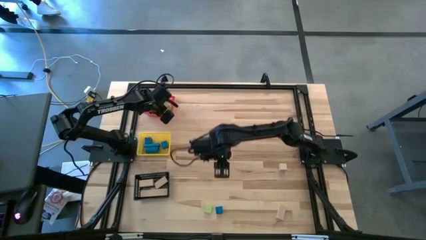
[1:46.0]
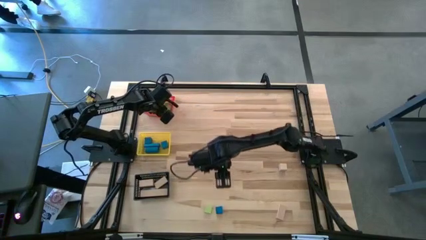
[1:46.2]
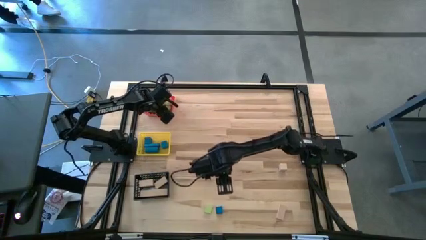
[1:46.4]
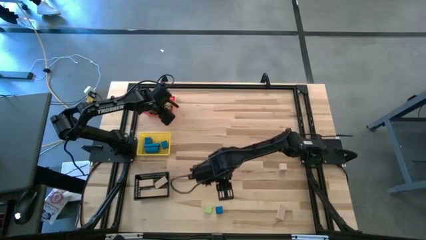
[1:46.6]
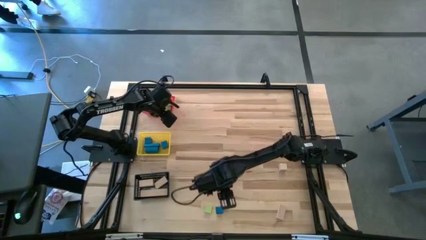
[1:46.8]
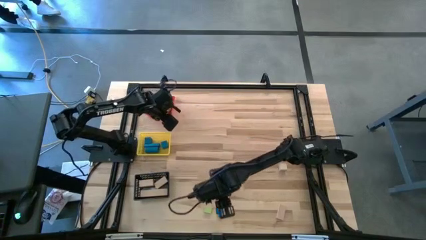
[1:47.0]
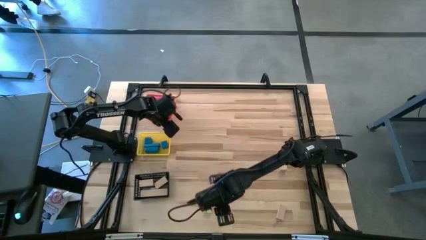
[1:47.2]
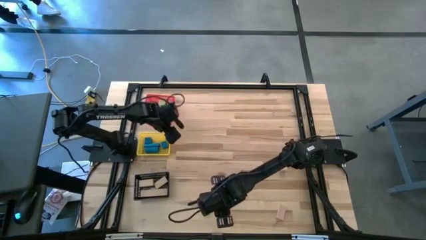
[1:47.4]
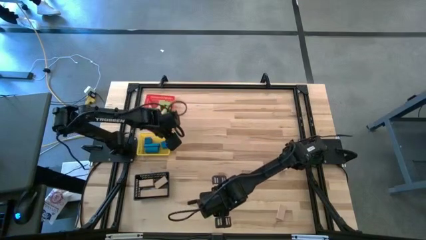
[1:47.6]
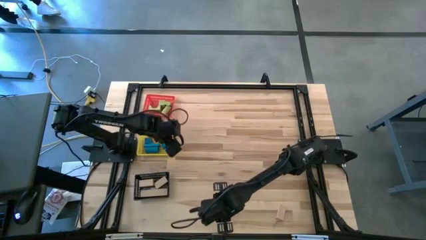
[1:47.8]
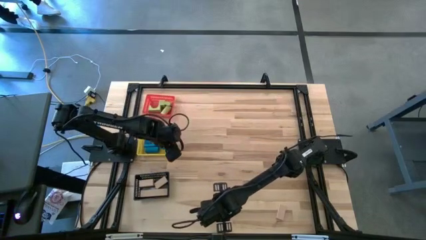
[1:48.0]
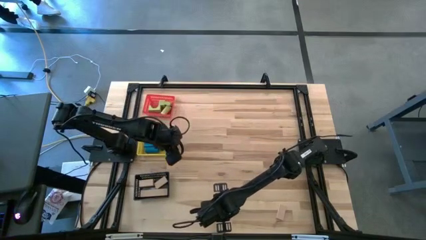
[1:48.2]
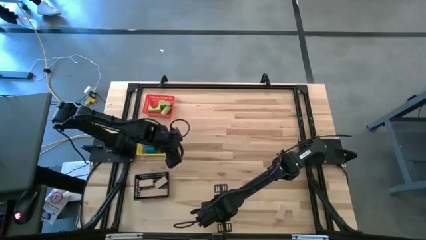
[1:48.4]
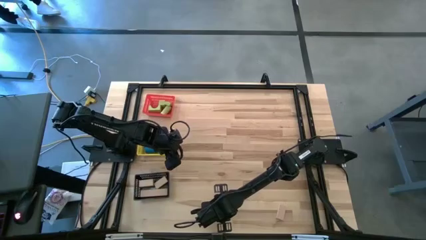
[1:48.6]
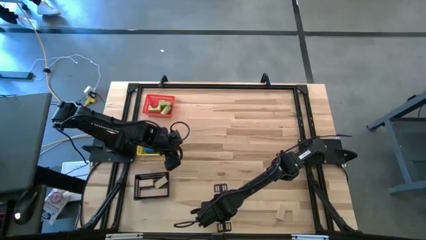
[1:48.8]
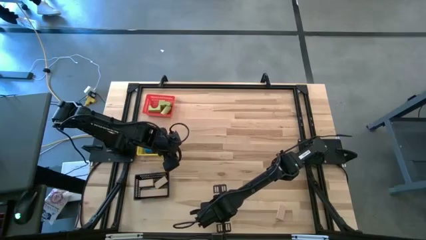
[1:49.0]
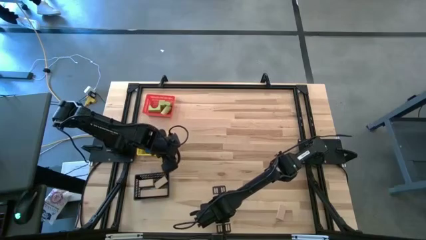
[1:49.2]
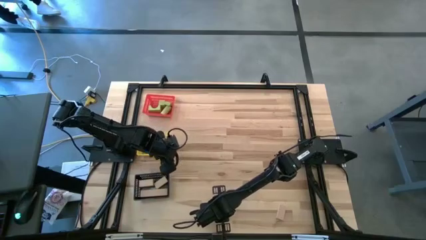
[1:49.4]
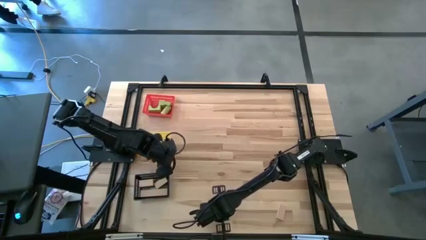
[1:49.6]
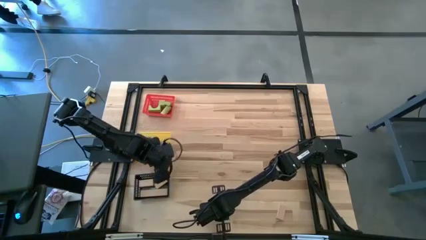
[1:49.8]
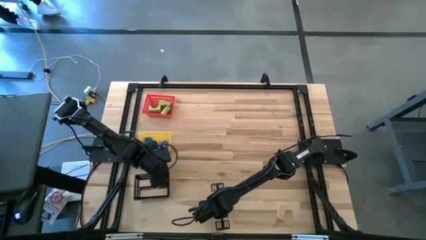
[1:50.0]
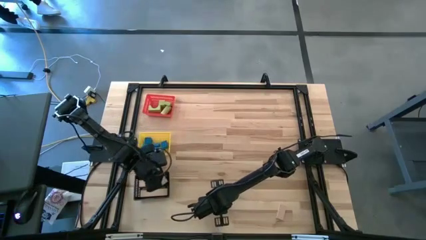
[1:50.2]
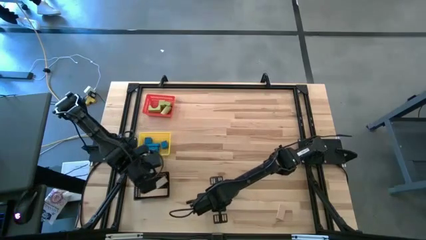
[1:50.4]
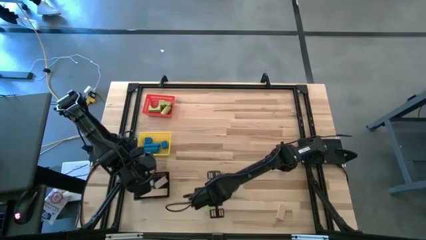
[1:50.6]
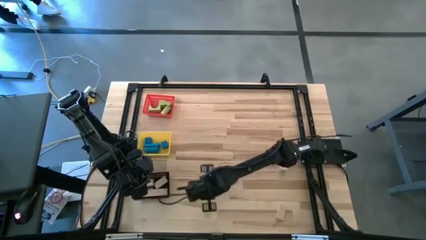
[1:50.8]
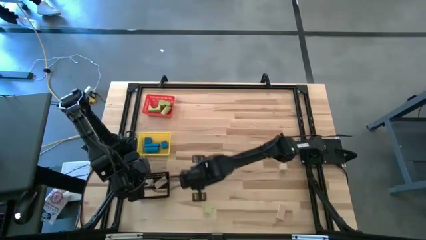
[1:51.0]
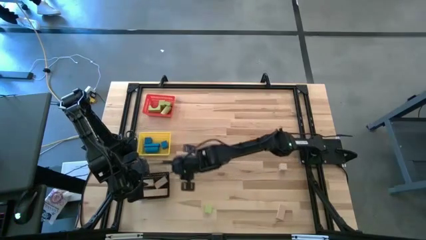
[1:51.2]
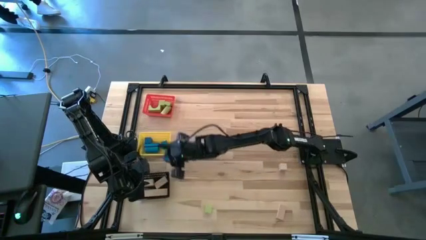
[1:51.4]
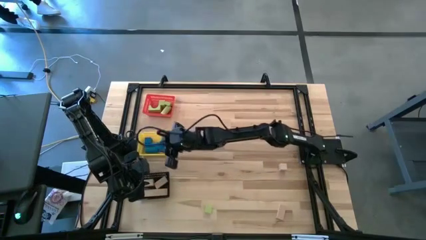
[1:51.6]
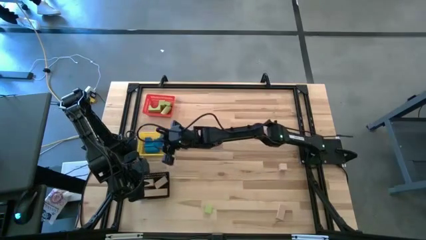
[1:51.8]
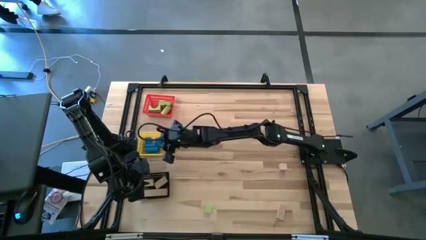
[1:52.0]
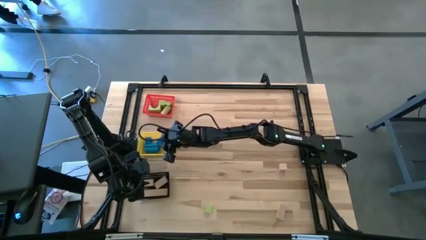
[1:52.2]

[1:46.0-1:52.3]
Task: Sort & place blocks by color
Put the triangular blue block into the yellow basket

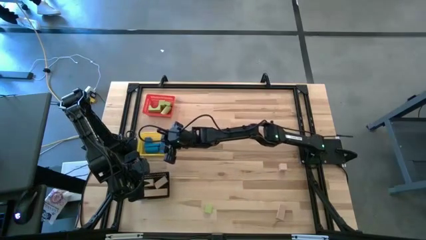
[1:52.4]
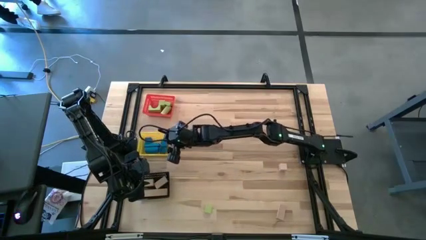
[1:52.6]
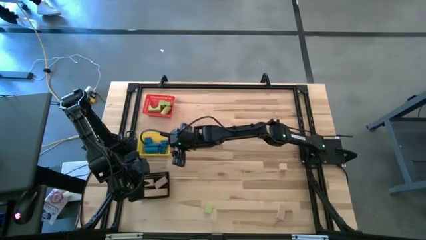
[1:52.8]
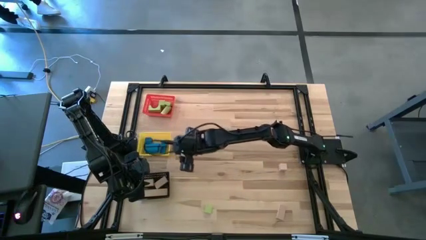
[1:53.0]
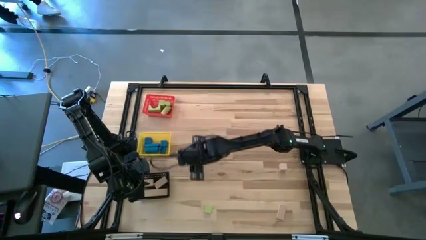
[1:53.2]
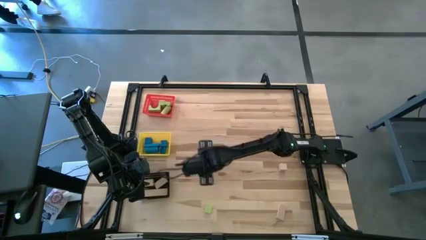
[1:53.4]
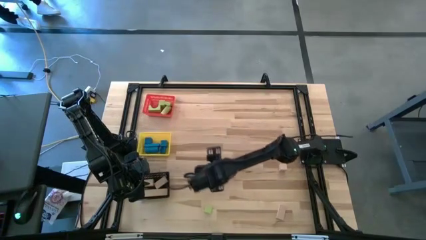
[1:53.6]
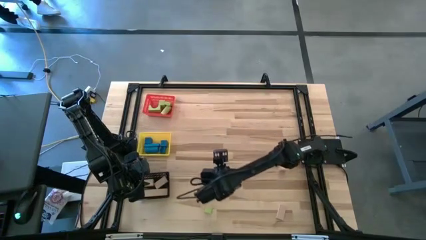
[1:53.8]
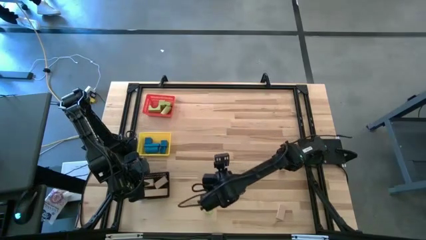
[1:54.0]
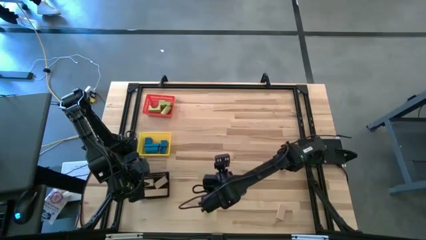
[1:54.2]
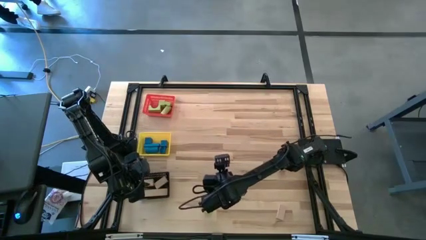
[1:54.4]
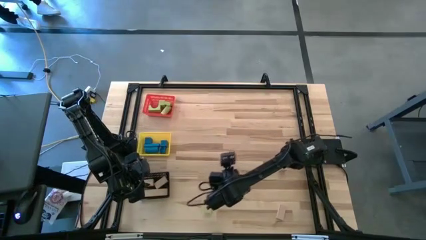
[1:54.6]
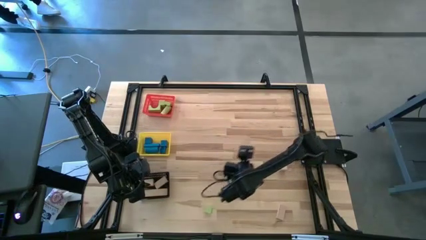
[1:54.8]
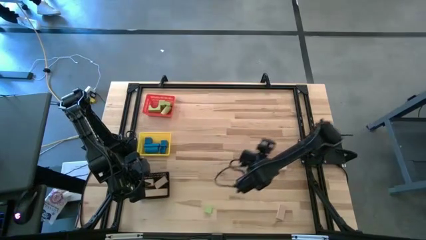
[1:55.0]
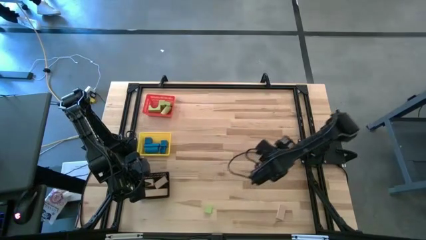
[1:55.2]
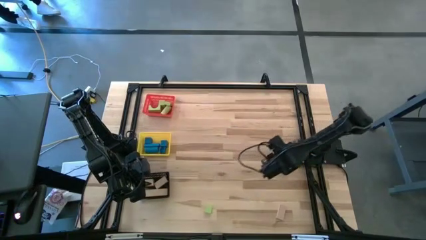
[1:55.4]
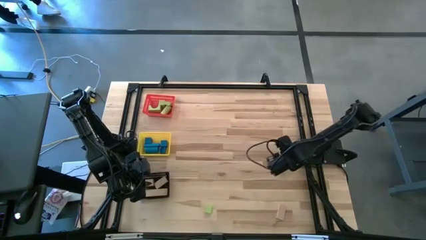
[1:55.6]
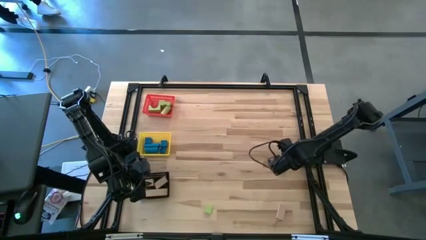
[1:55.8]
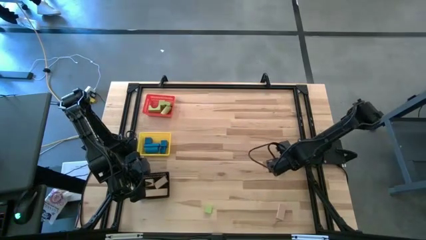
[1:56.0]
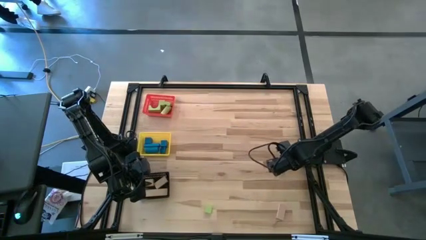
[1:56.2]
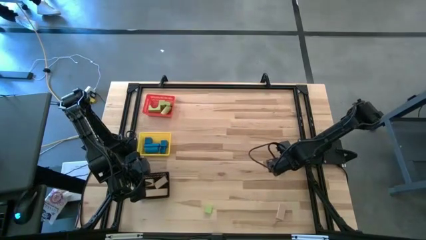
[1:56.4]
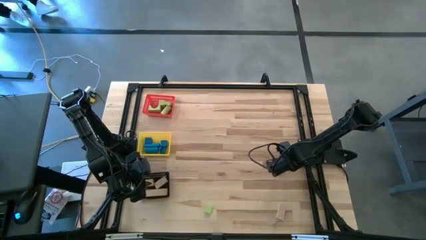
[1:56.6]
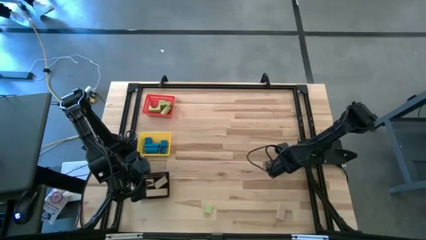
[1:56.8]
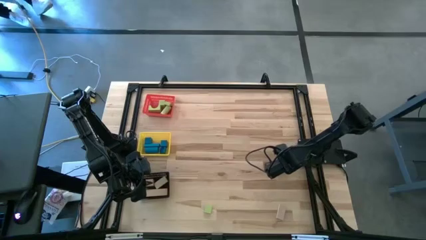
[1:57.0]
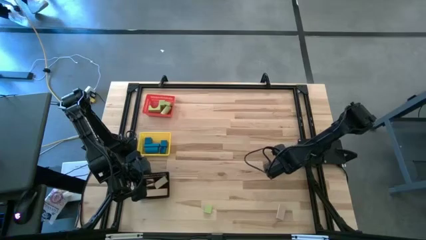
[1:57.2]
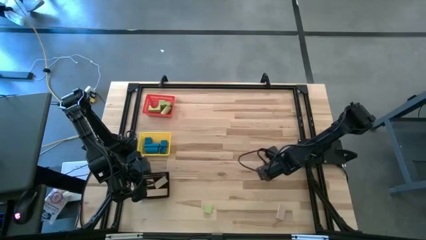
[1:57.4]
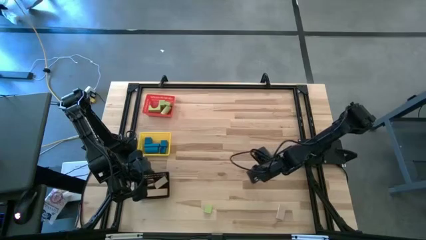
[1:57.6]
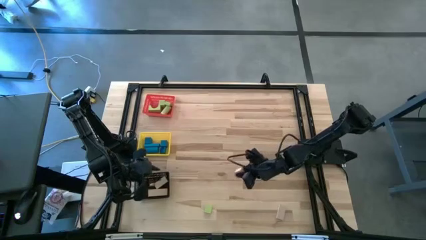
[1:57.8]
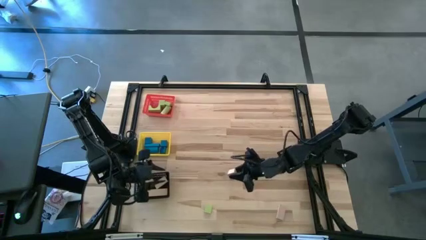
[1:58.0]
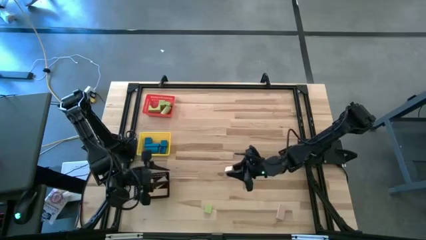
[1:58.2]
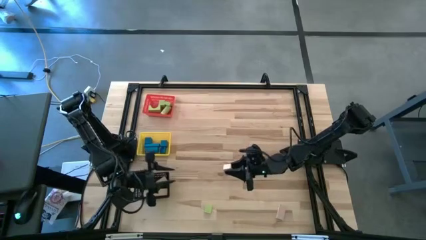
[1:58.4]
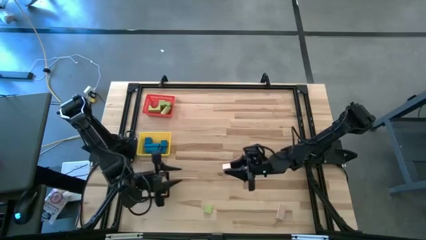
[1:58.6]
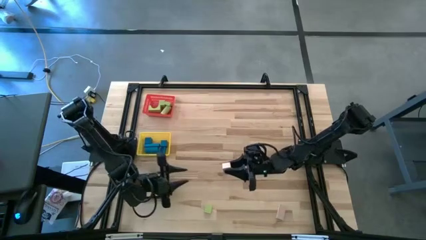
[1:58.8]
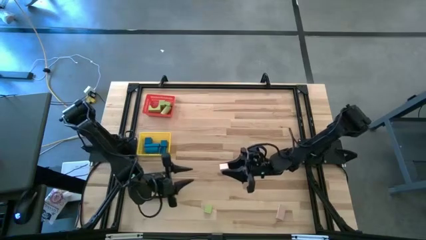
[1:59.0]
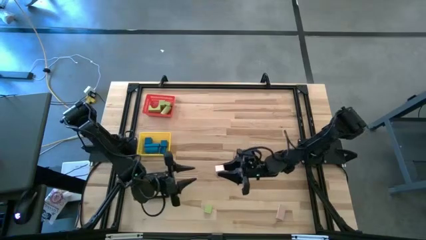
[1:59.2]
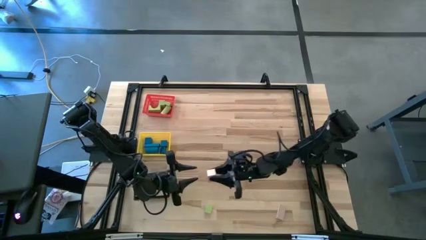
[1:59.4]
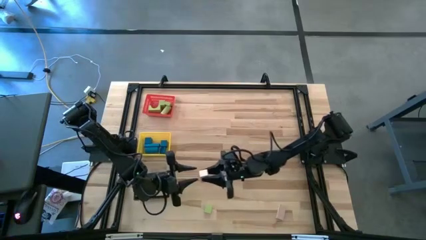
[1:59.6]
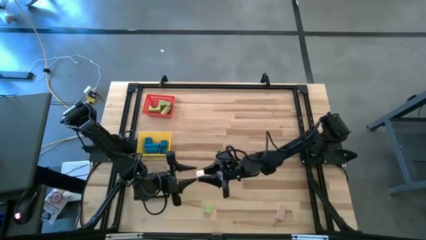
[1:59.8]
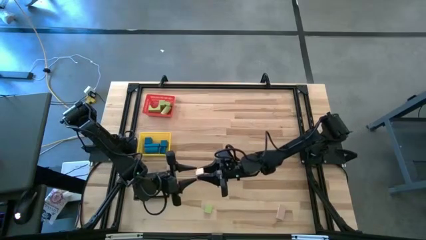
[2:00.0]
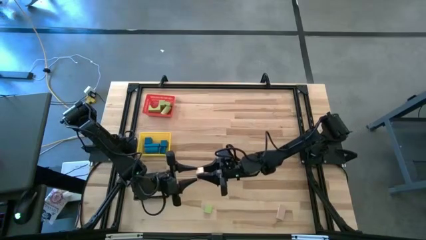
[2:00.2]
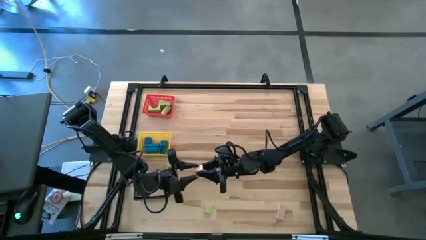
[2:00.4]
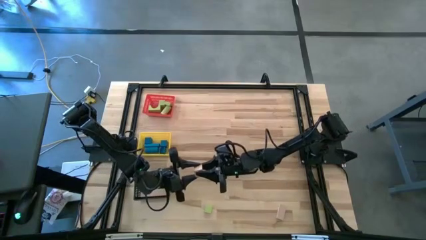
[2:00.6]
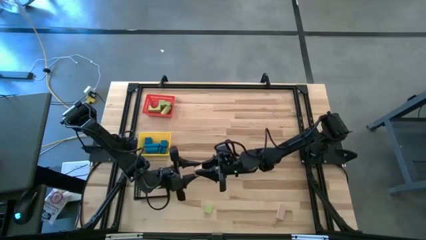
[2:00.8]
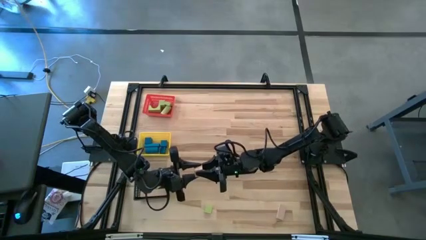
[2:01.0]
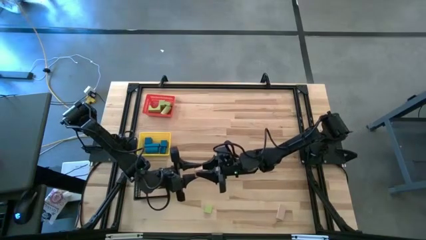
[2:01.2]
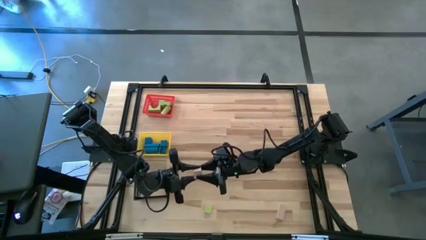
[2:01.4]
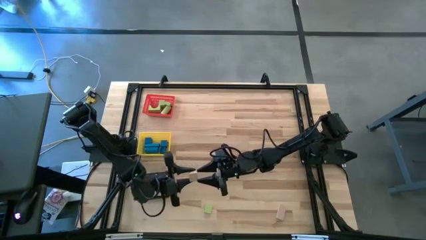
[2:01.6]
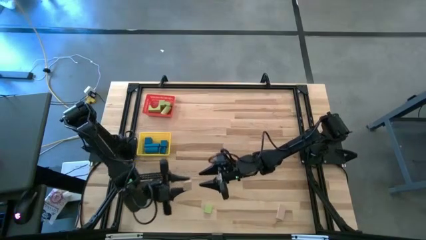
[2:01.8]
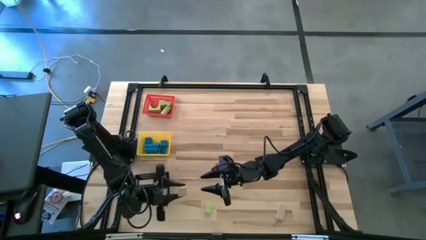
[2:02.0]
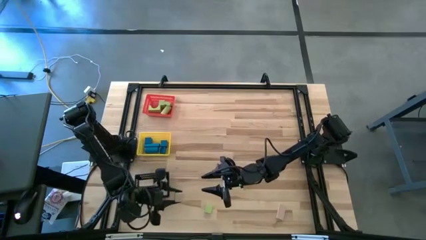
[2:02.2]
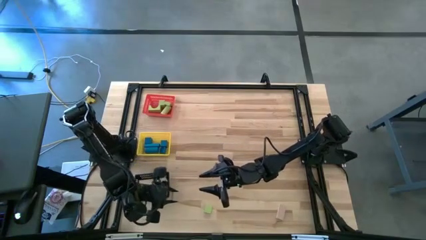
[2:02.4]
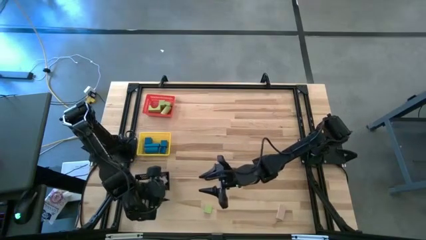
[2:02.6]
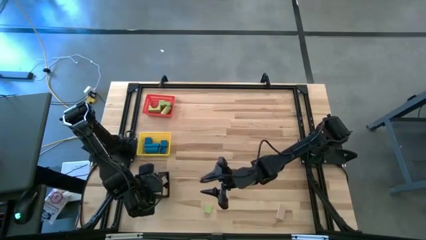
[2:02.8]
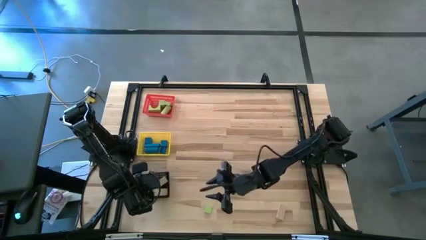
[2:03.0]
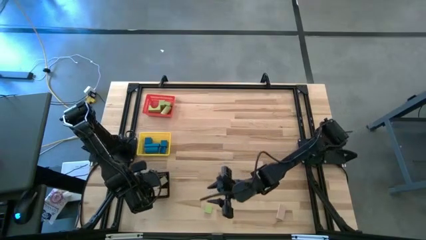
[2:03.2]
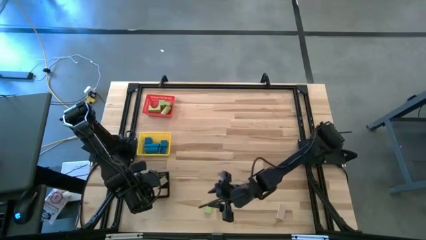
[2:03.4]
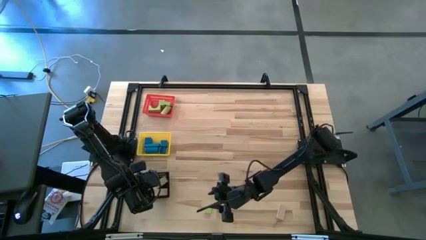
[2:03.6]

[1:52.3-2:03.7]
Put the square wooden block into the black basket
